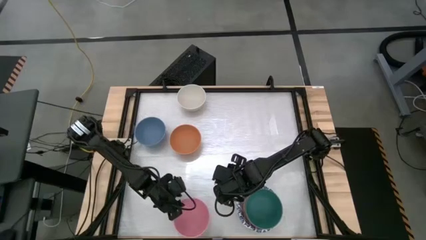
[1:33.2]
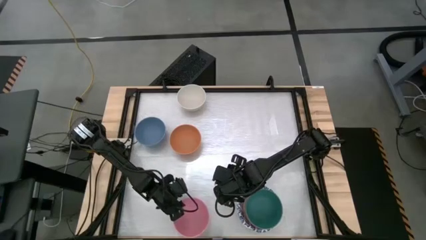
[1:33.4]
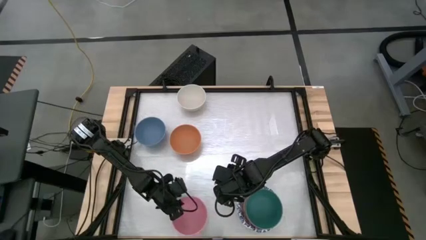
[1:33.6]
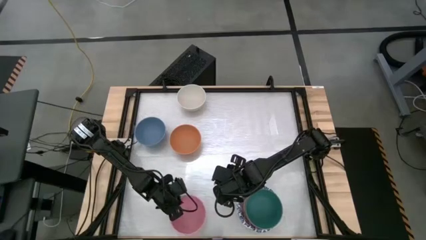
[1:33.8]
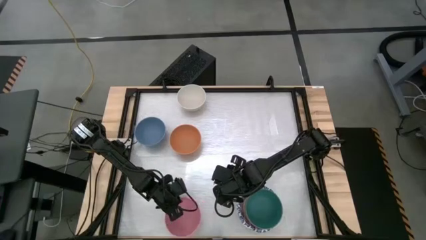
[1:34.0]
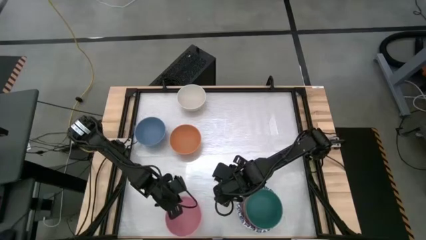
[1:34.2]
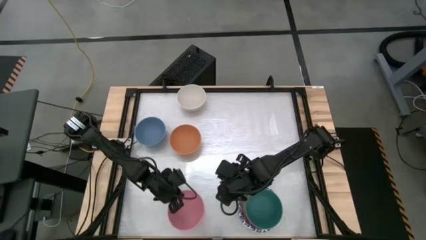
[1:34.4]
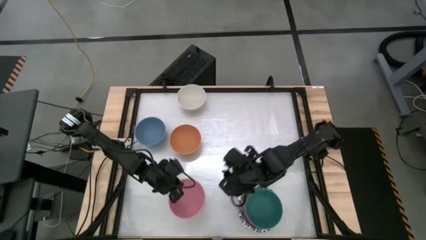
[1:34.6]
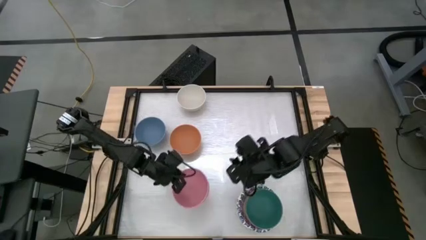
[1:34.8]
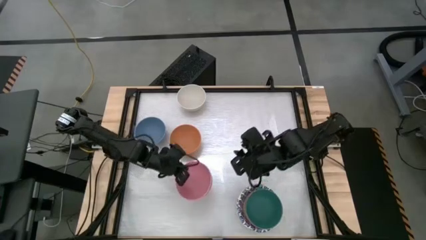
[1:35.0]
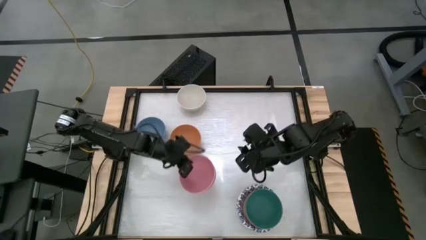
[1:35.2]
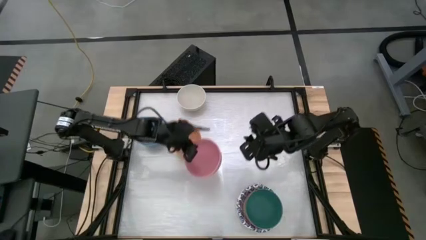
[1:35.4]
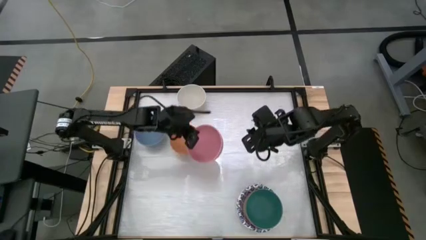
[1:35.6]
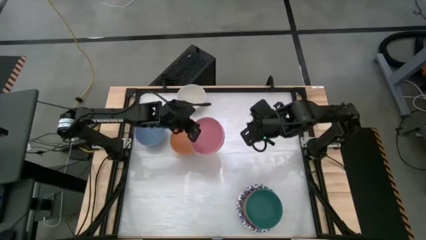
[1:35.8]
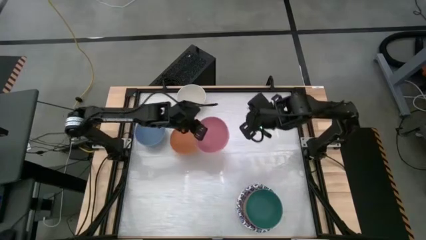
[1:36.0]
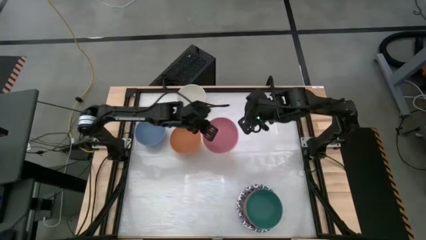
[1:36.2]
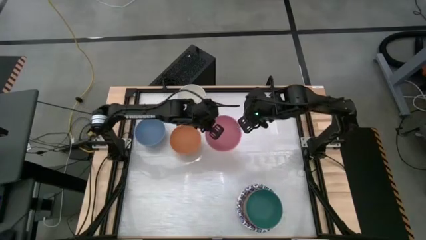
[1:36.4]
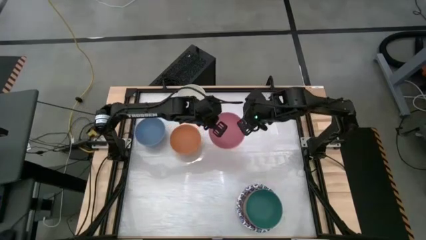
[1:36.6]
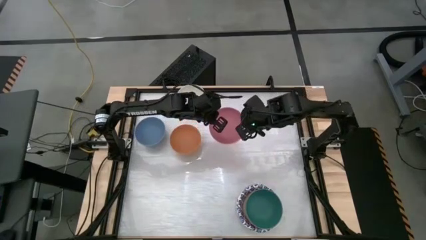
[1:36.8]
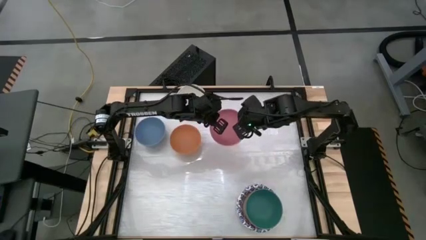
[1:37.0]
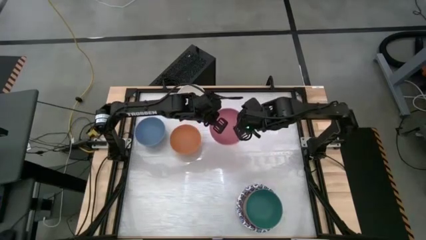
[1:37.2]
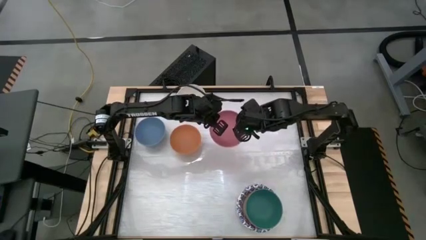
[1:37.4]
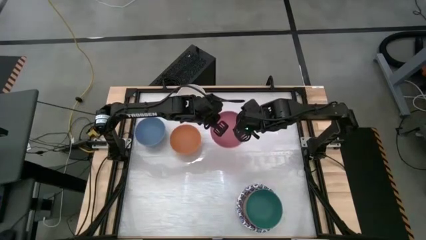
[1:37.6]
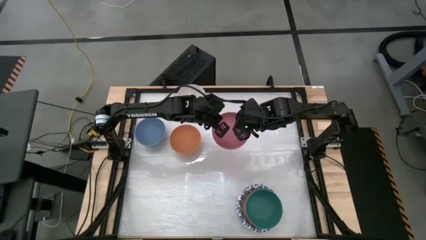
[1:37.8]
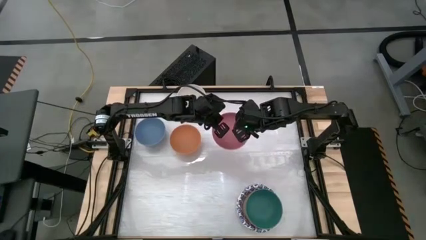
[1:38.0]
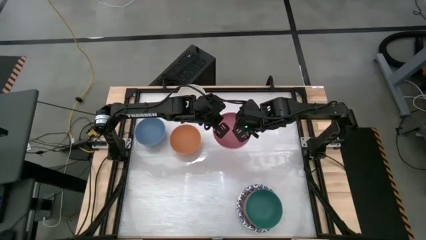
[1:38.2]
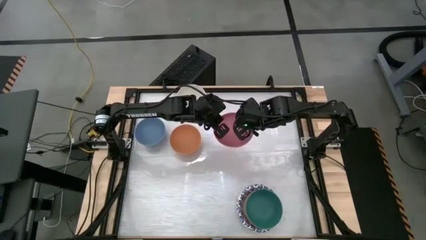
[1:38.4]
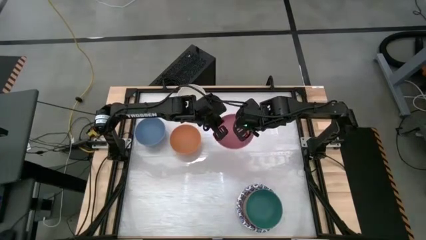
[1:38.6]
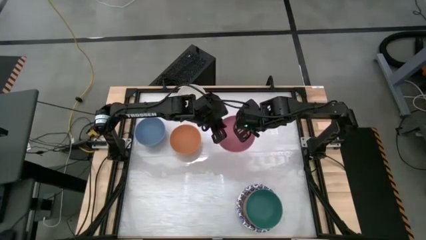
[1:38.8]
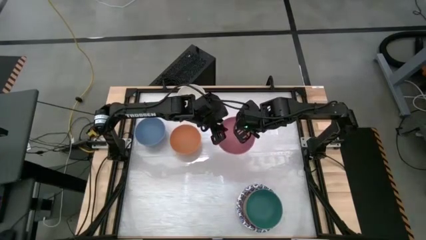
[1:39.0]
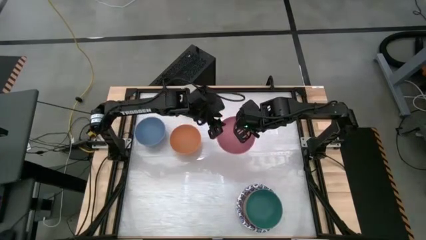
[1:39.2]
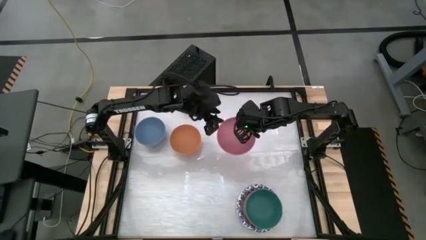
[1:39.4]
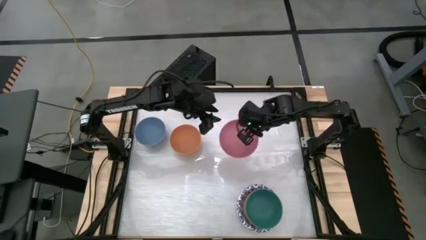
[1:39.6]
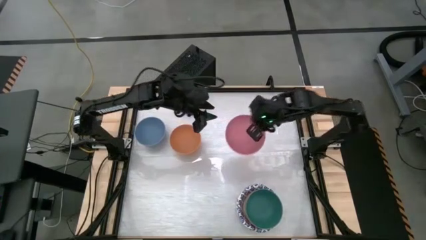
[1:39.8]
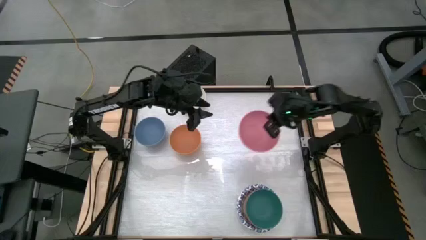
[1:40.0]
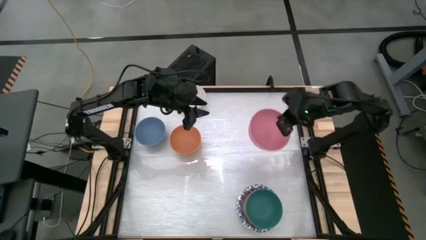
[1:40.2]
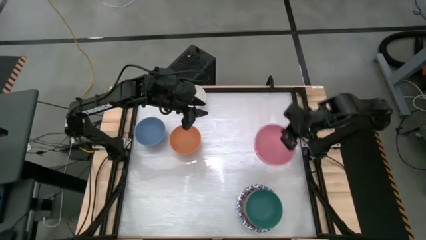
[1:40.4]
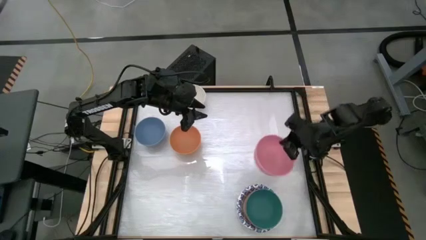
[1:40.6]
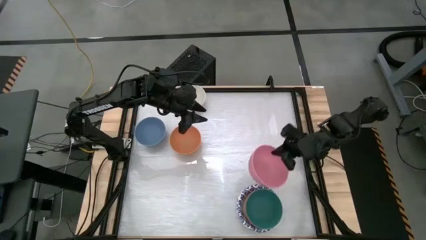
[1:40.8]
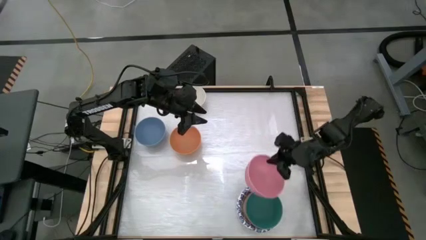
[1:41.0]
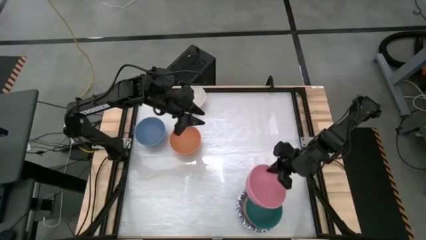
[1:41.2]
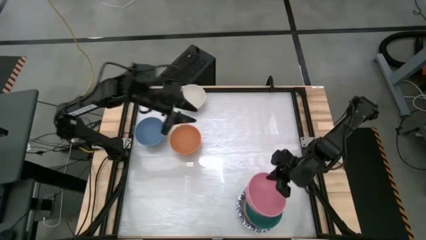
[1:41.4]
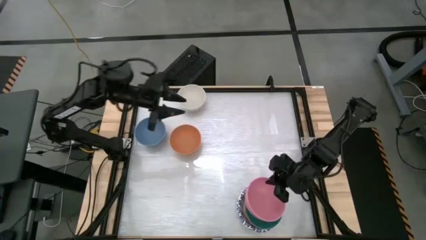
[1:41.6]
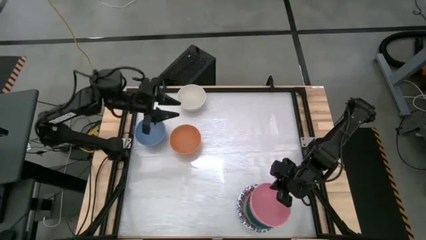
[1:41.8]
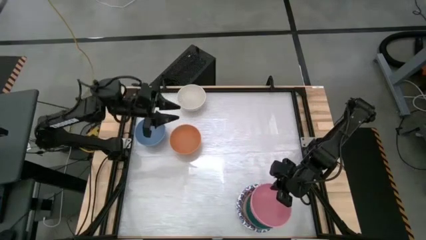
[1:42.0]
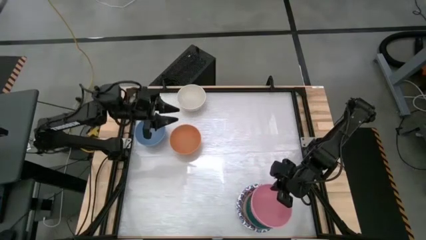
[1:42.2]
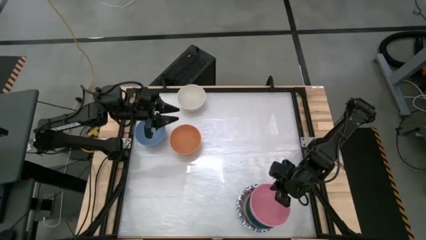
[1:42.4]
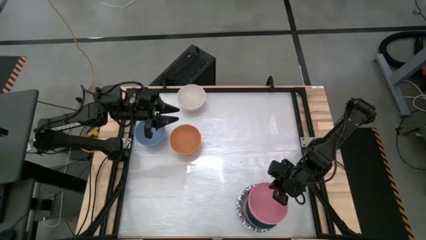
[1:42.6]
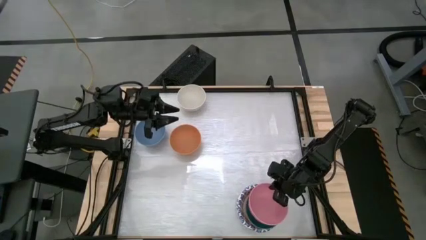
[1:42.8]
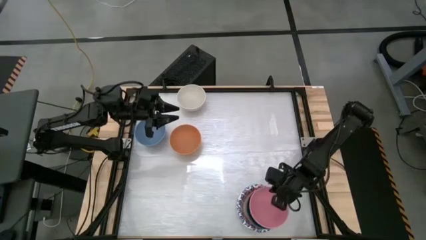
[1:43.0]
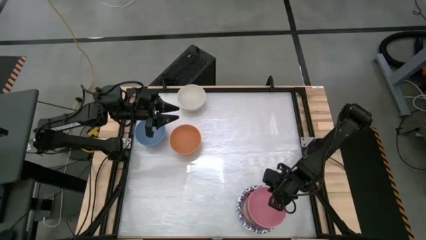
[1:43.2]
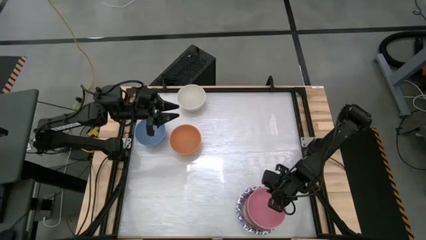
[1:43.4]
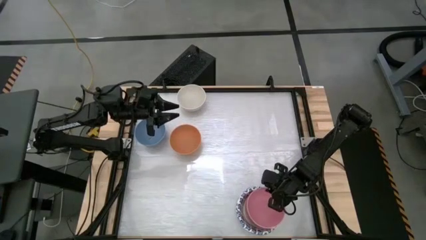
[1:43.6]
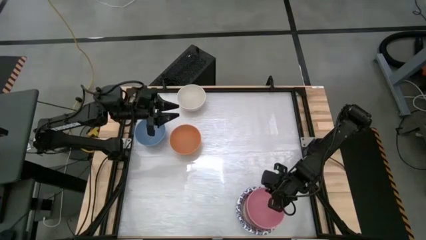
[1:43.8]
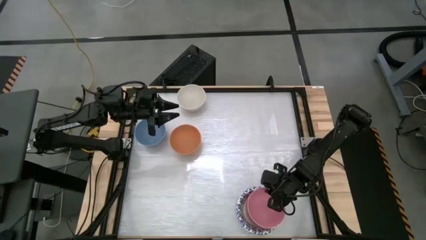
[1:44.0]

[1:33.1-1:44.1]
Stack the pink bowl on top of the other green bowl
